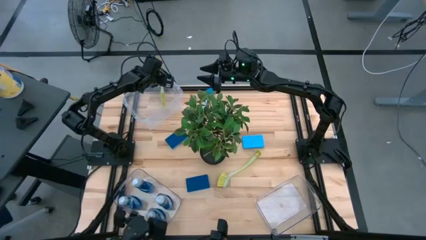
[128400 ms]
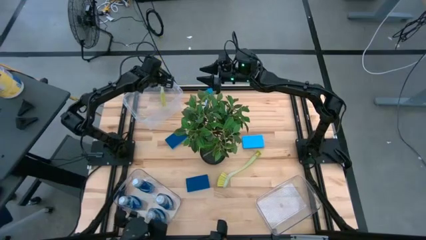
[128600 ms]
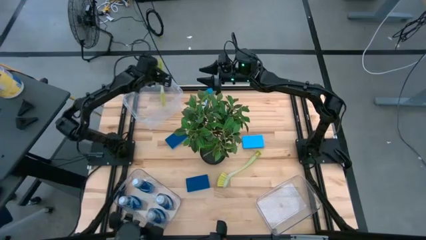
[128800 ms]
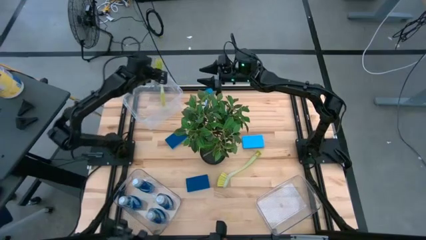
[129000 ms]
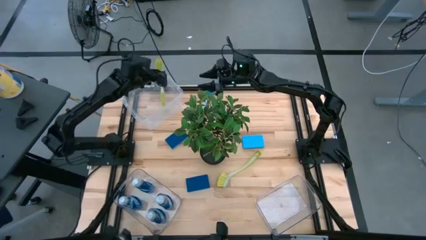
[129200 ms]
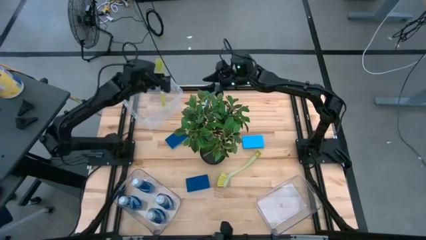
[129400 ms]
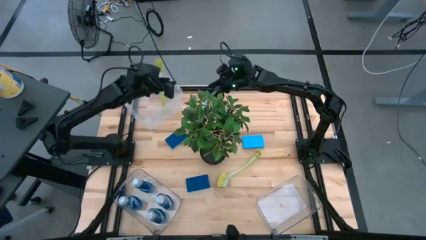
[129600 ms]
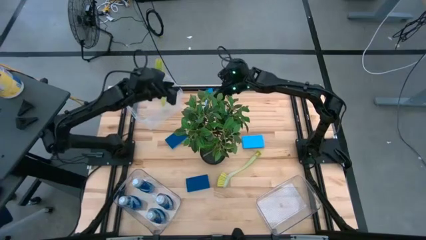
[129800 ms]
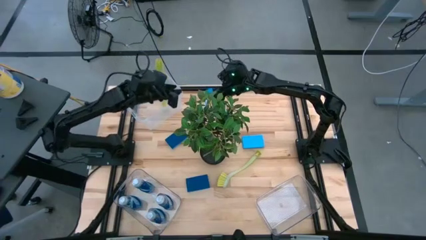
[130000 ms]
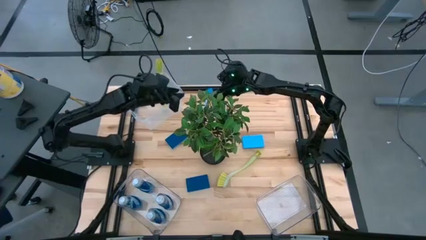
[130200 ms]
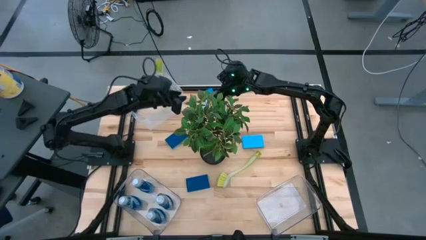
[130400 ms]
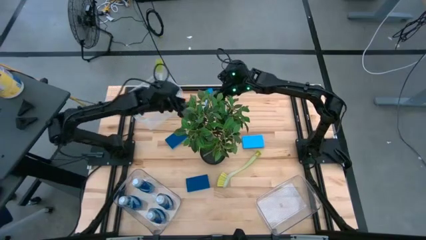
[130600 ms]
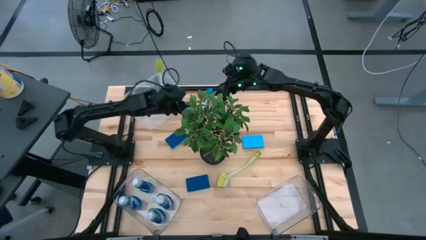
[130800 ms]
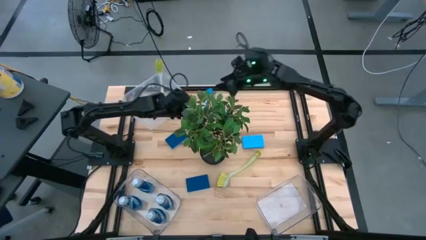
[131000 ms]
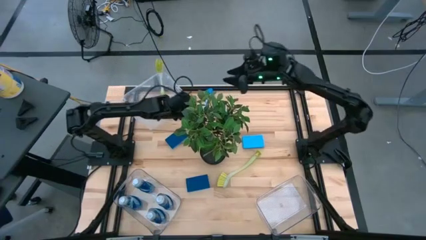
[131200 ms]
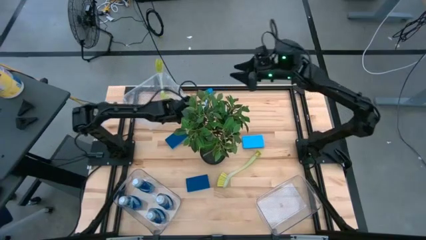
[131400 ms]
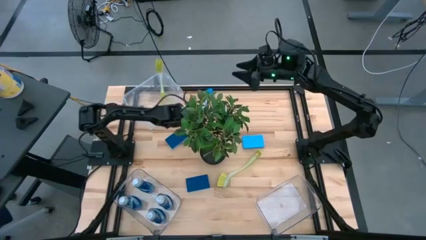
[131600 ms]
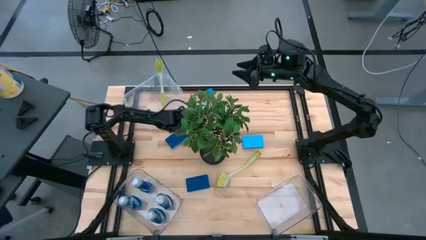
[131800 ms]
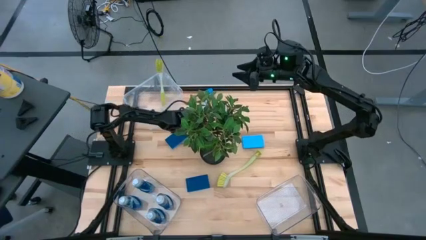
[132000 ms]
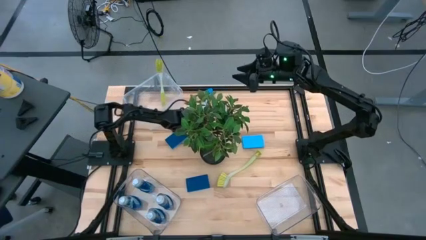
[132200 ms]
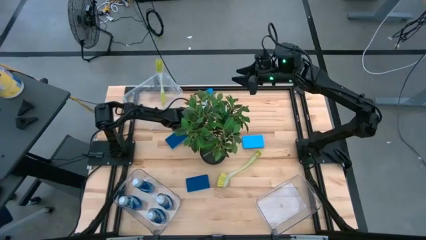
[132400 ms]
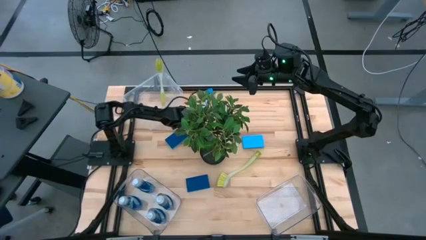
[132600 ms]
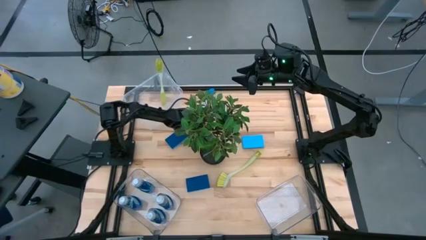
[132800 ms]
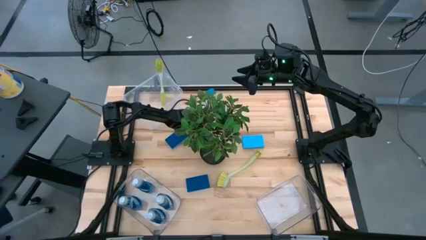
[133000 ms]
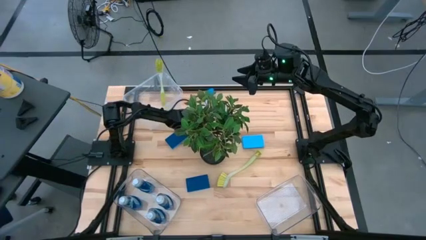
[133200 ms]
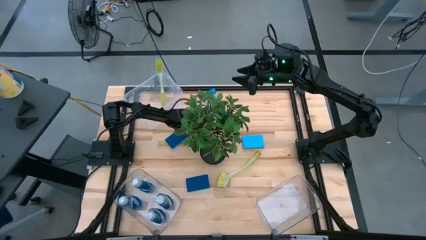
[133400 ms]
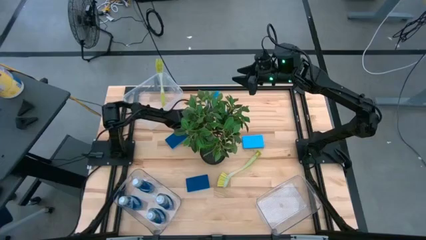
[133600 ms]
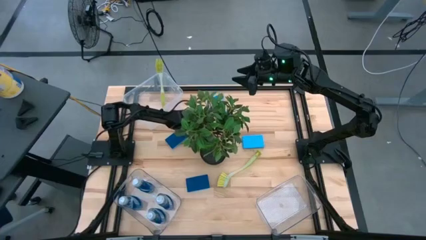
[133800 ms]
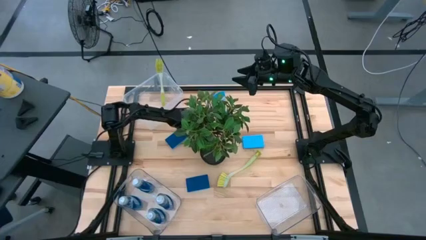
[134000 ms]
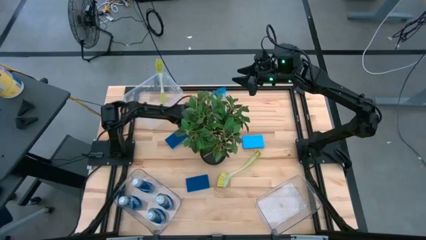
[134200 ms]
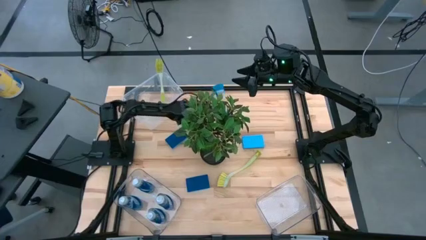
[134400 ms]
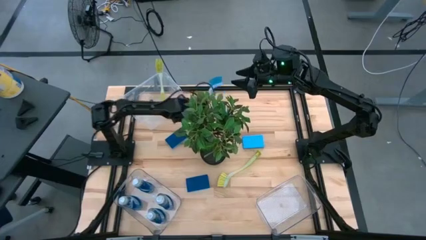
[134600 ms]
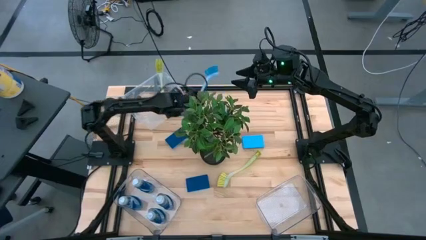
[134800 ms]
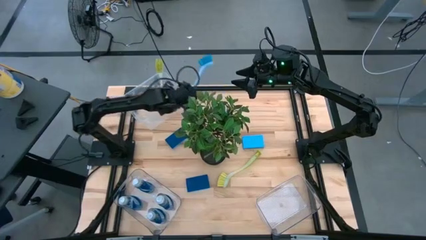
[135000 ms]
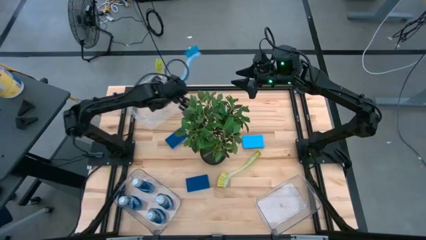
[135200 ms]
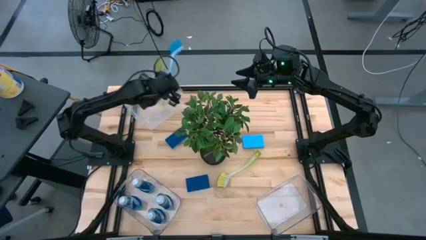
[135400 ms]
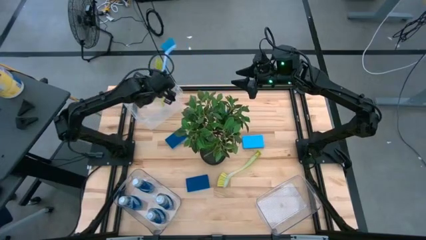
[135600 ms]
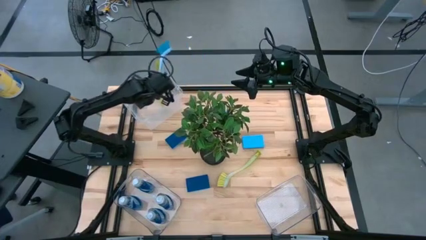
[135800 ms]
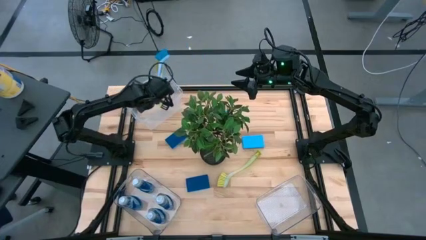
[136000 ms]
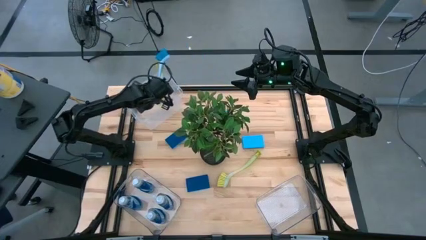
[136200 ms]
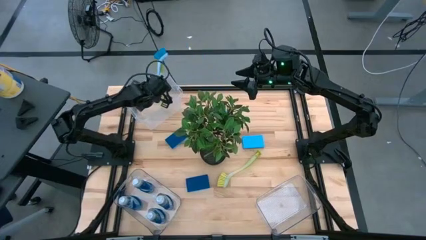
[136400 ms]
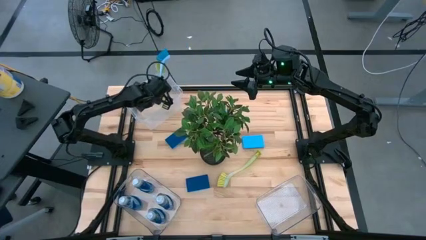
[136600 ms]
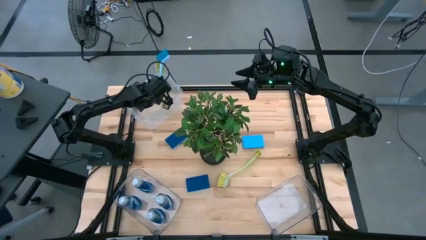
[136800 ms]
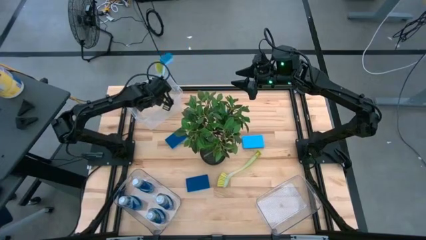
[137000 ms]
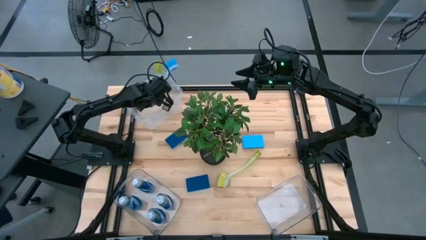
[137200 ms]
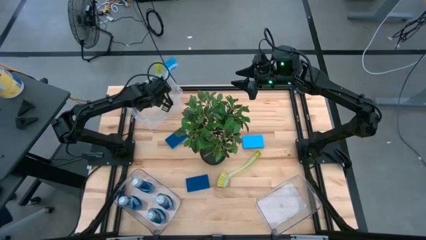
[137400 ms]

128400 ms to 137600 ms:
Task: Pick & Place Kitchen Sink Supplies
Put the blue kitchen brush into the top transparent bin

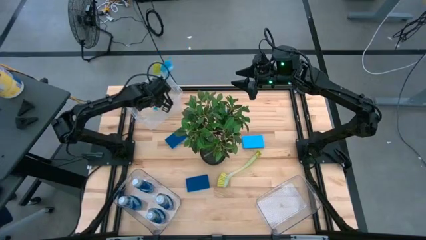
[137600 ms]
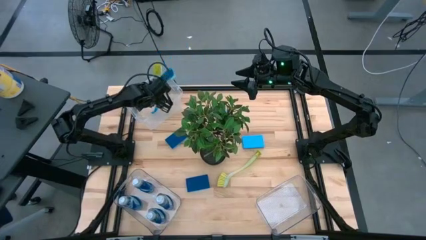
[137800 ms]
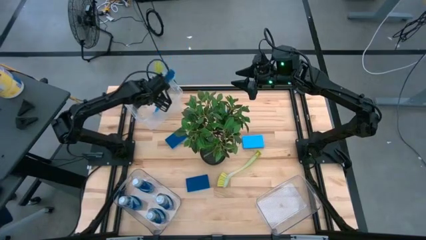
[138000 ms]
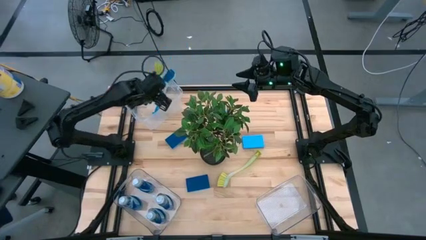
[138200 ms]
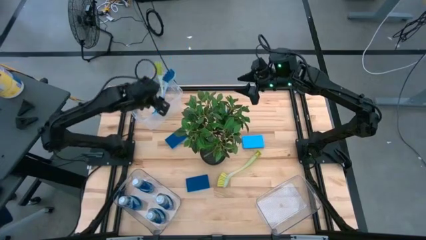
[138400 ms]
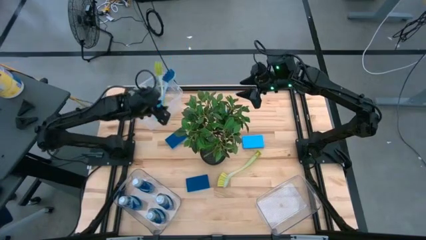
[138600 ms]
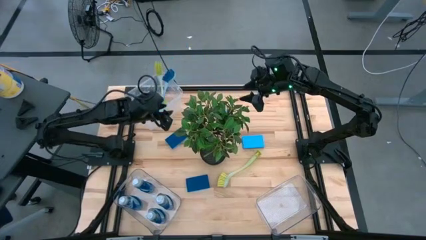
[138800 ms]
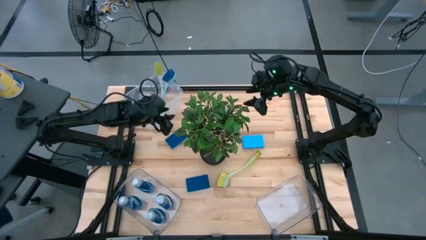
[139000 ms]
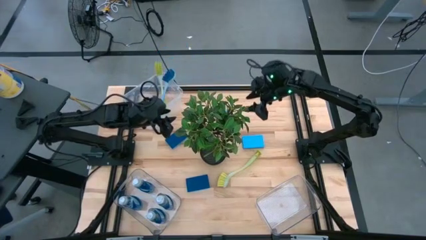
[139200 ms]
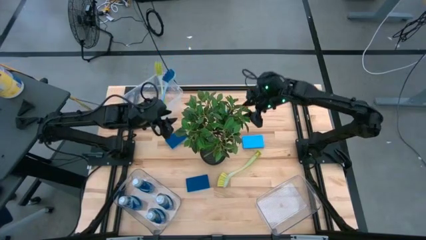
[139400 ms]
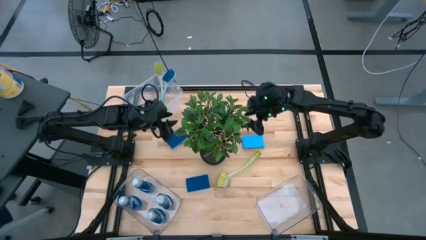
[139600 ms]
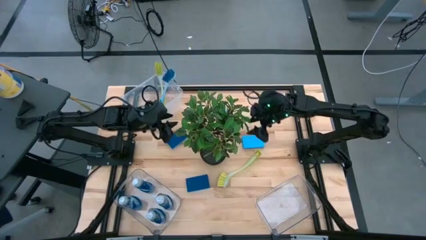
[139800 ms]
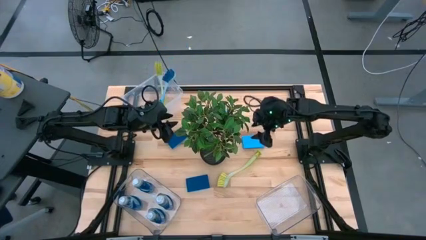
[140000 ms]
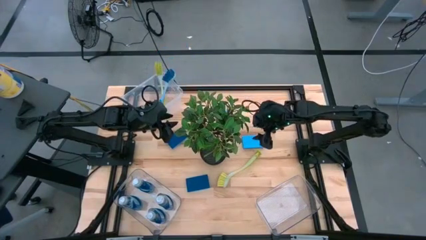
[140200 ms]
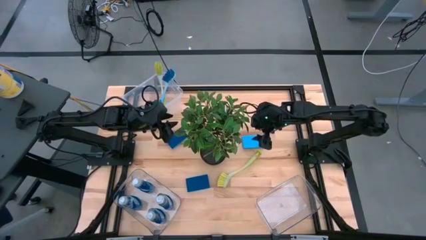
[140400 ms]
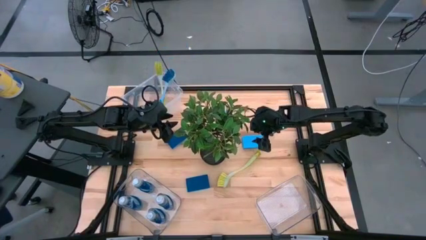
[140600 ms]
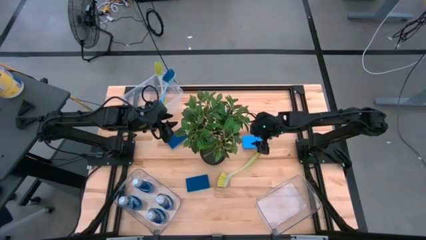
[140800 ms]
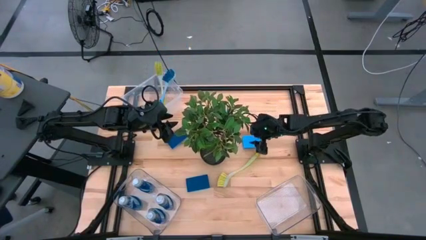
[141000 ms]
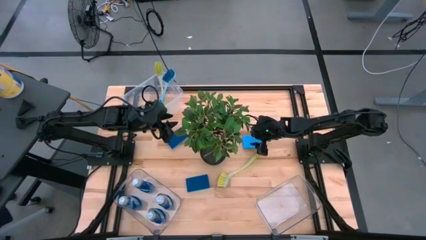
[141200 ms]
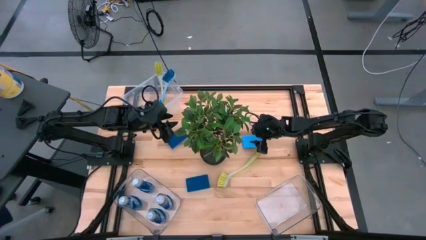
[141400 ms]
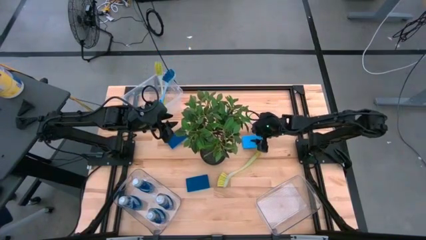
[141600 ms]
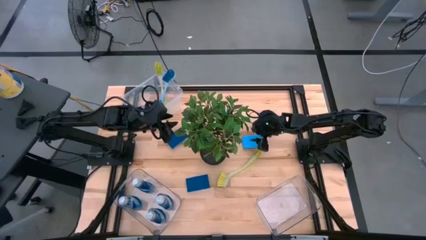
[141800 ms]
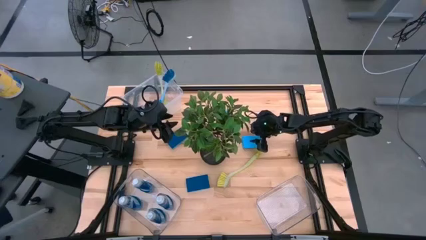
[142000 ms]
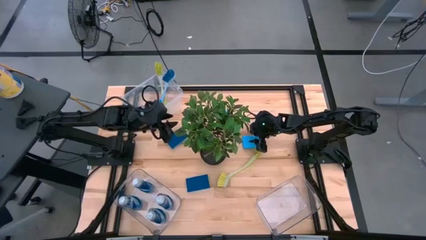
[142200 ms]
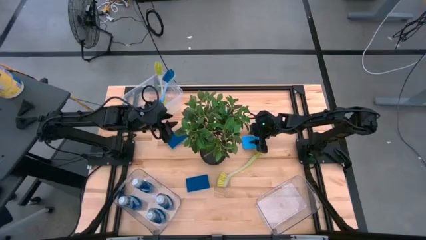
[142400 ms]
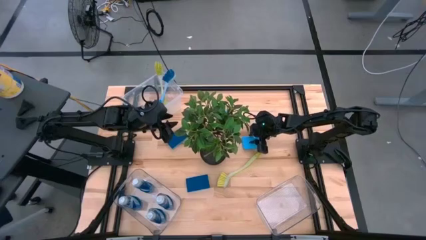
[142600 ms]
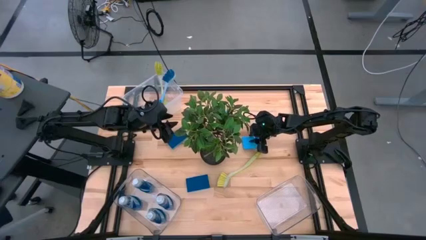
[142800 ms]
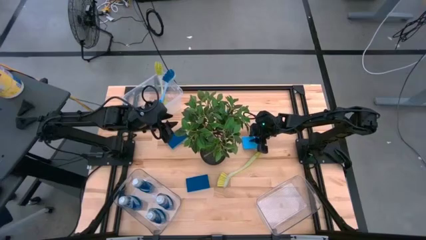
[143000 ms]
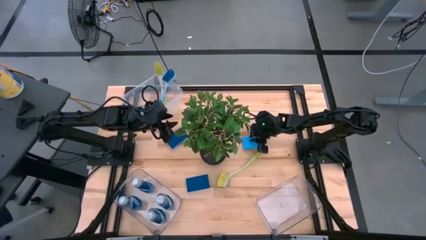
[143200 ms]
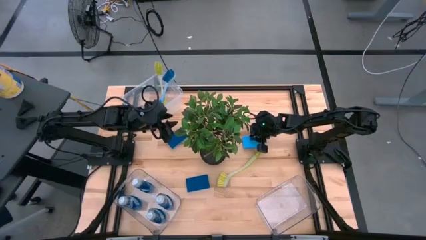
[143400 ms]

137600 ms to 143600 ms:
Put the blue sponge into the bottom right transparent bin

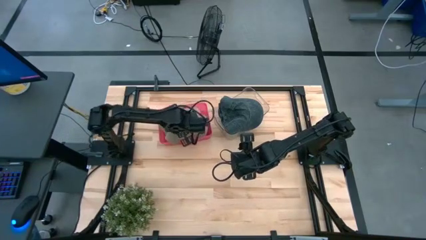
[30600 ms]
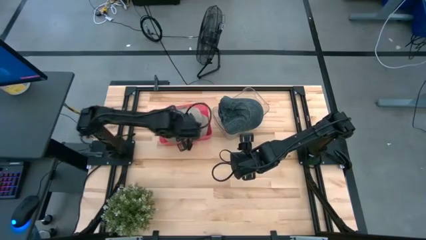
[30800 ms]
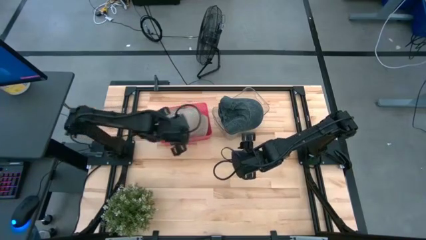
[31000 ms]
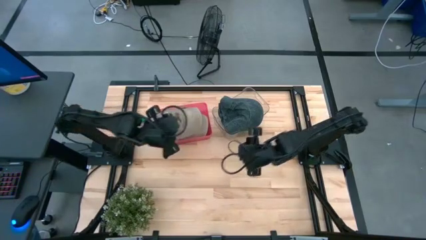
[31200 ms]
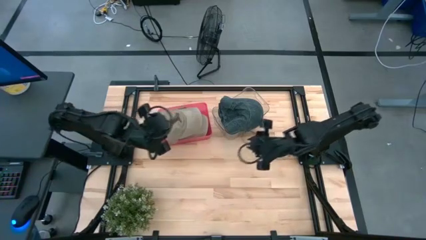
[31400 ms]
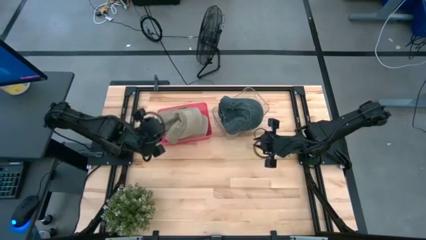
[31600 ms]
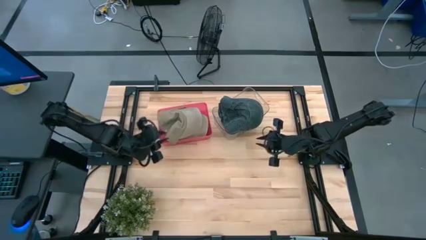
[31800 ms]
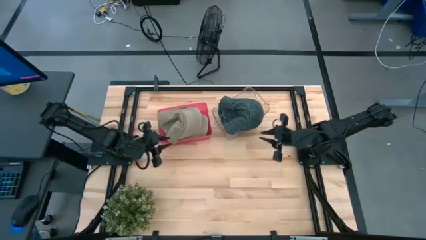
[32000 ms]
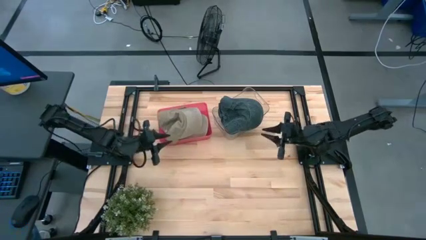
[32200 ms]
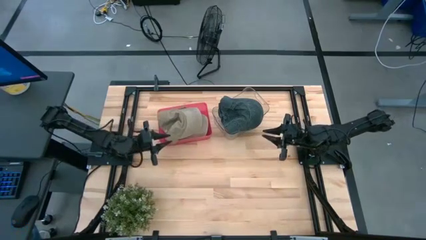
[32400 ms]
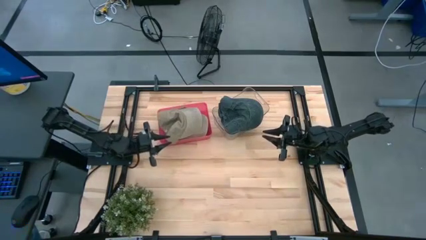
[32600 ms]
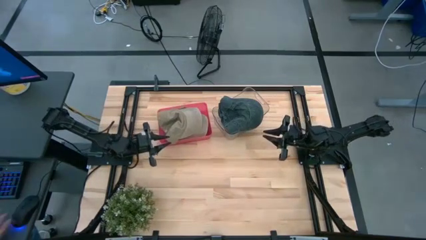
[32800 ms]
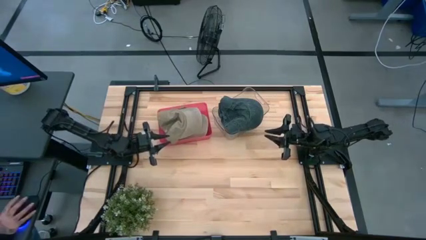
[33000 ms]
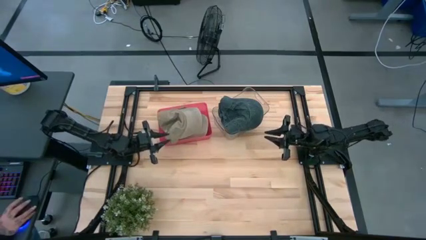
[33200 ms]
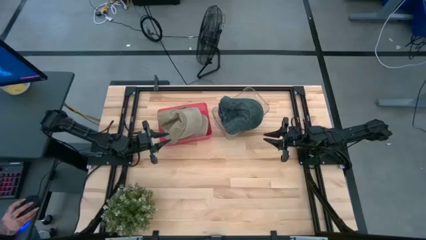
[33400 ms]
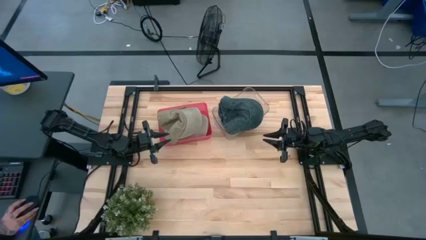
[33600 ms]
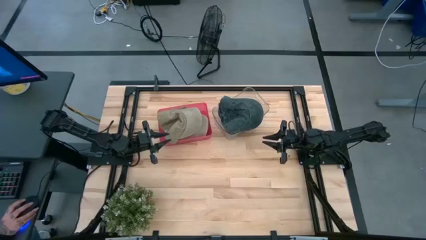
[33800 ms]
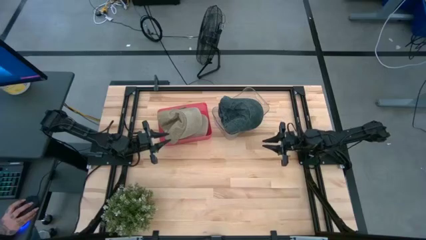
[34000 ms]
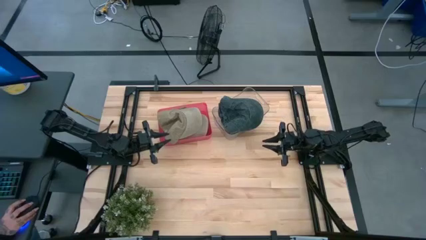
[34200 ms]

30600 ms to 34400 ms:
Task: Pick & Place hat
Return to Home Position
